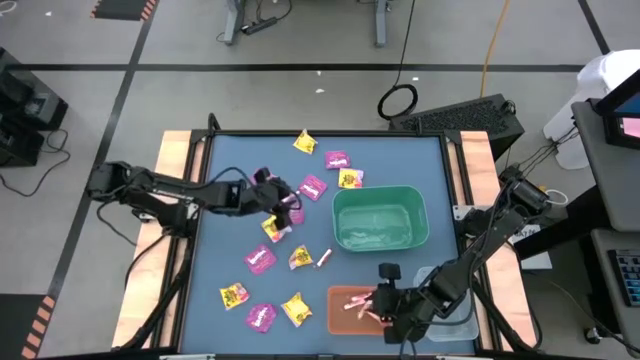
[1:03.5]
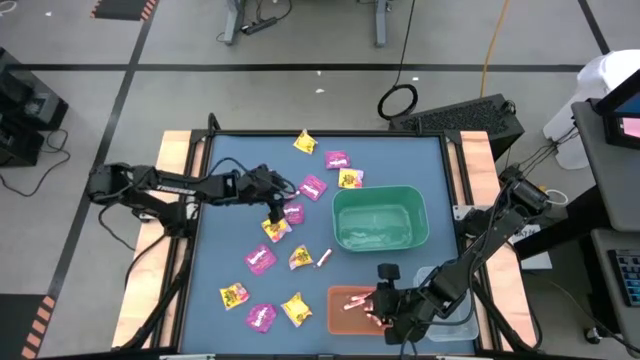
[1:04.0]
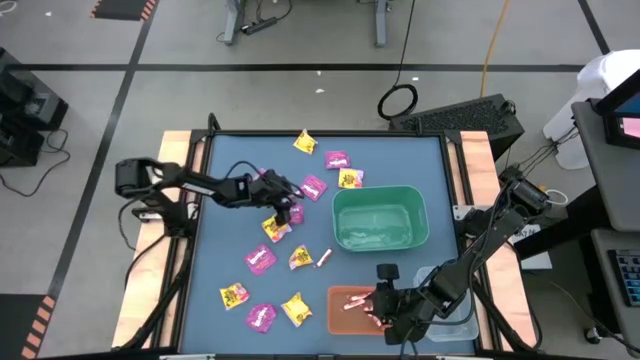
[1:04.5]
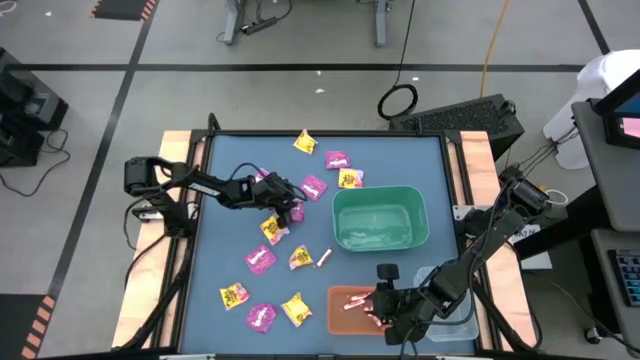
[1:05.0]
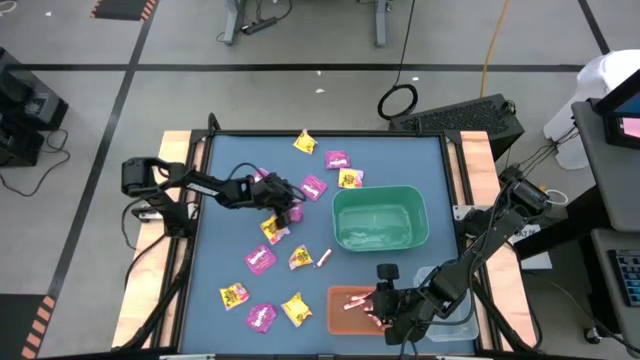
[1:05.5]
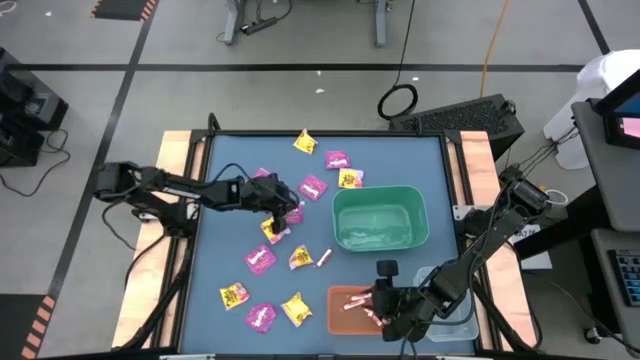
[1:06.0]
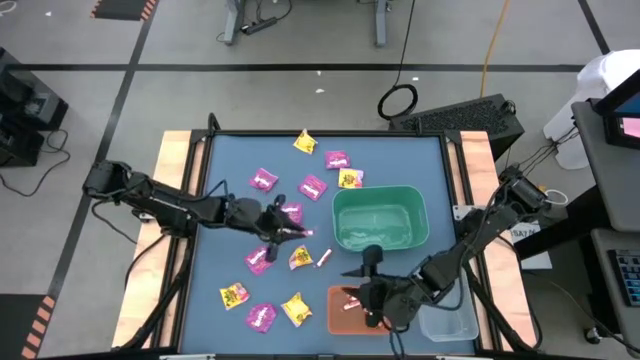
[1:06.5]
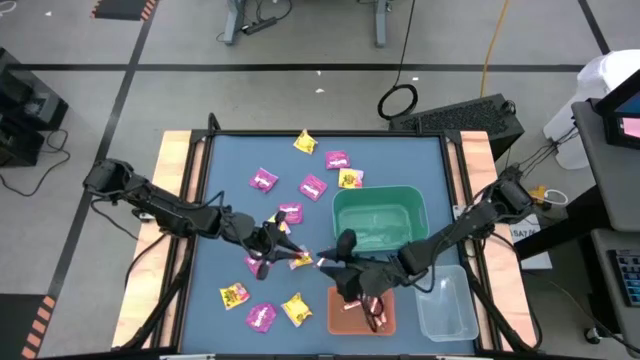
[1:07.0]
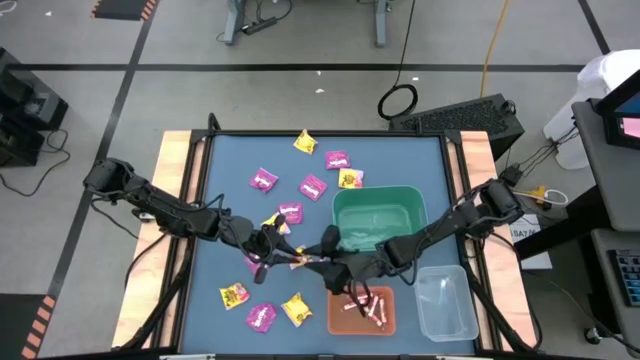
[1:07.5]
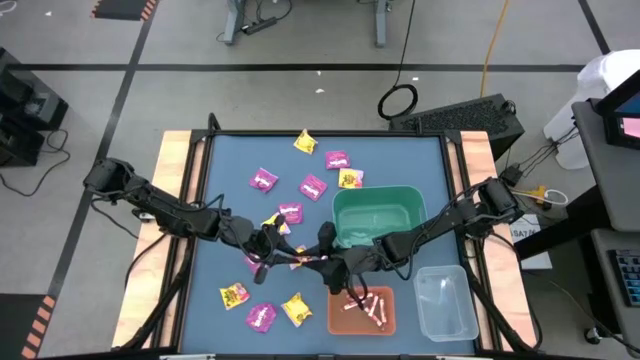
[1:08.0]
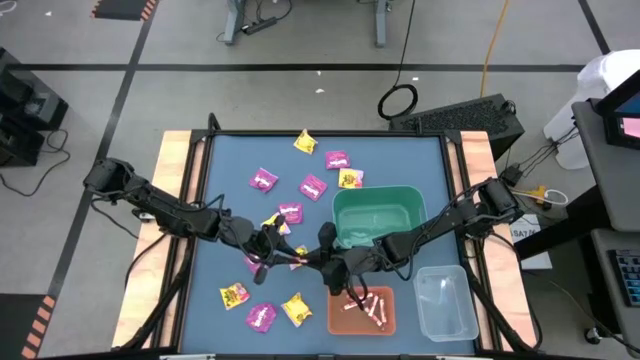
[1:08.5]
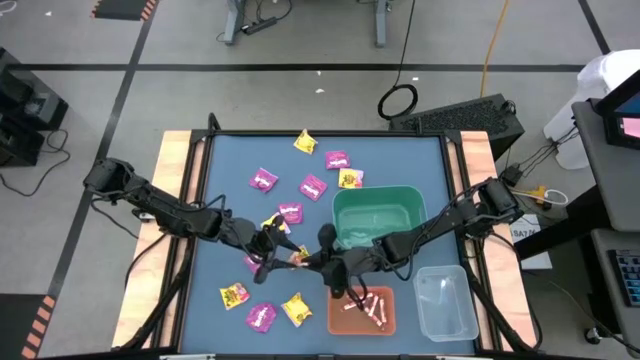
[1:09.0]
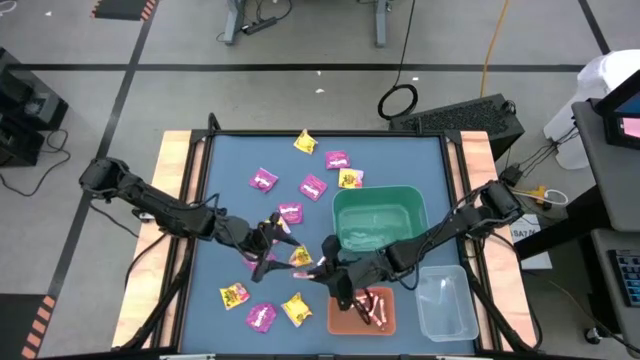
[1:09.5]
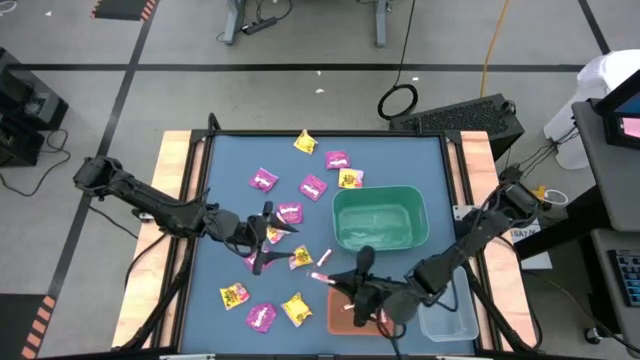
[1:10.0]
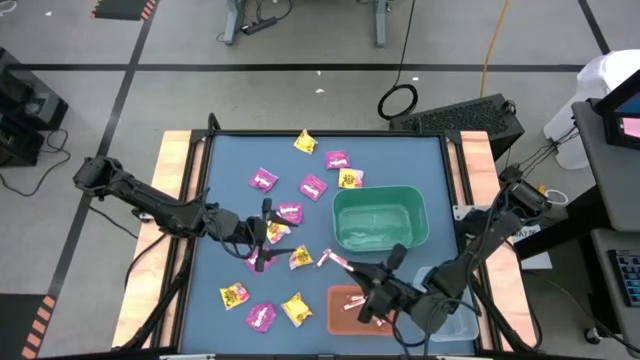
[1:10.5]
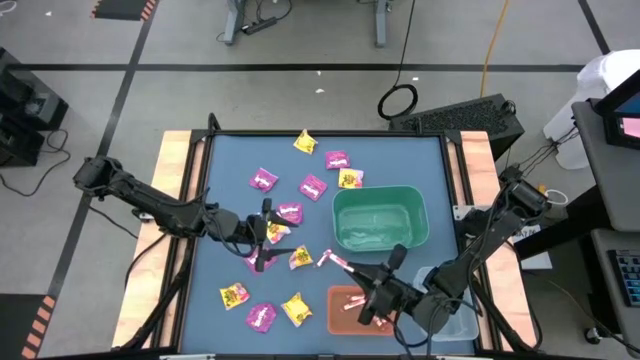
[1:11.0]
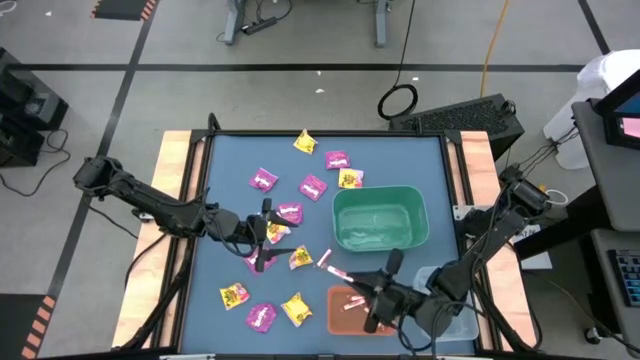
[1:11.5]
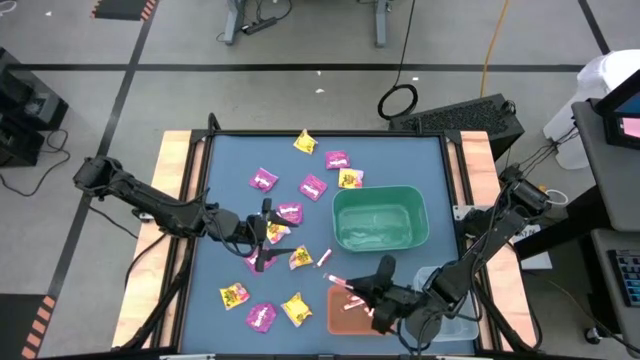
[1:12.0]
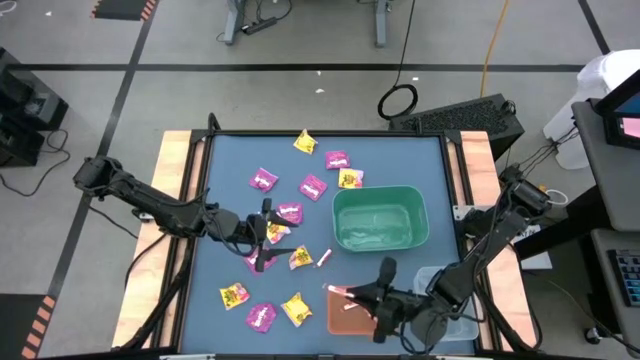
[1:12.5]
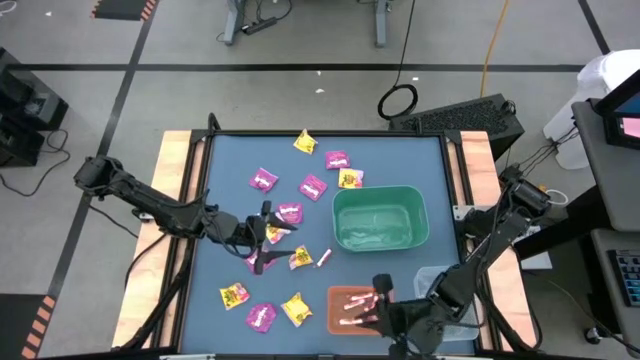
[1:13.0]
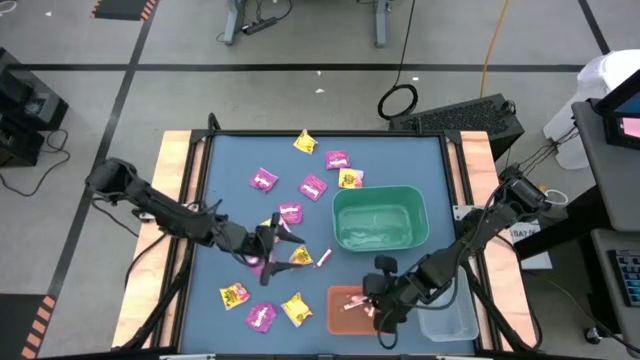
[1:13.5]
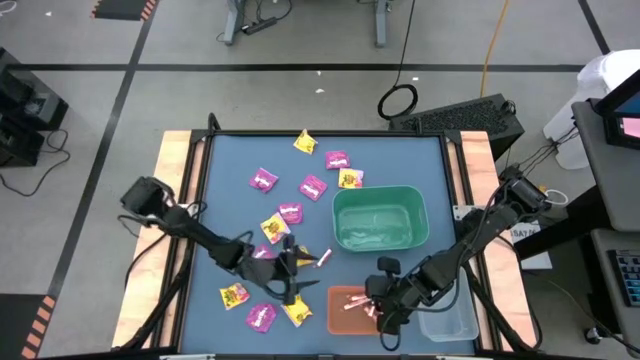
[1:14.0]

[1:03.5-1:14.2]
Task: Sort candy
Put the white candy into the orange bin

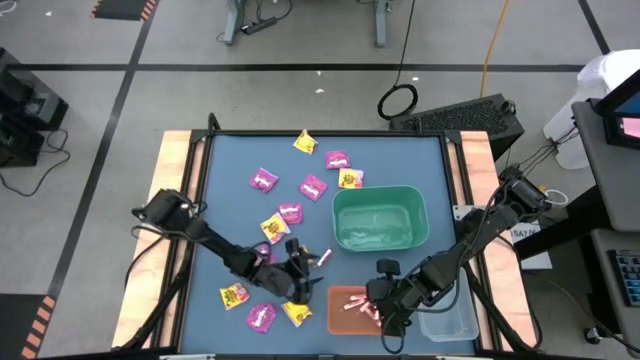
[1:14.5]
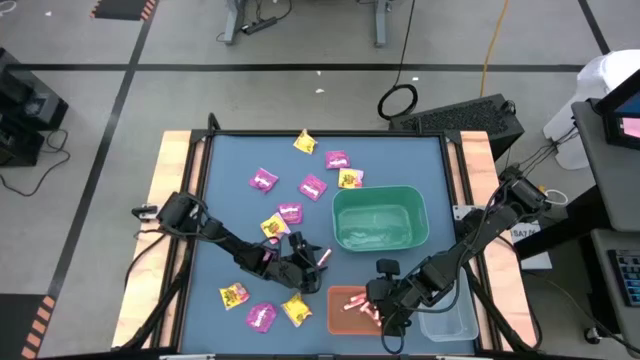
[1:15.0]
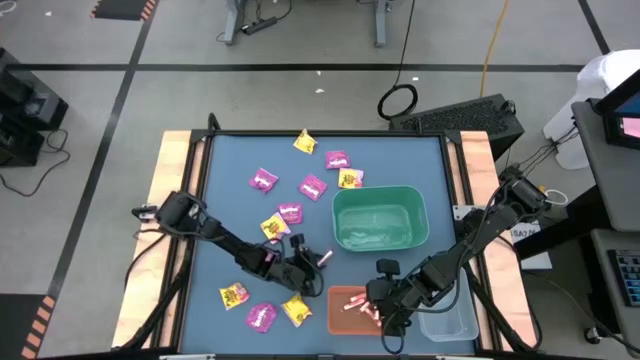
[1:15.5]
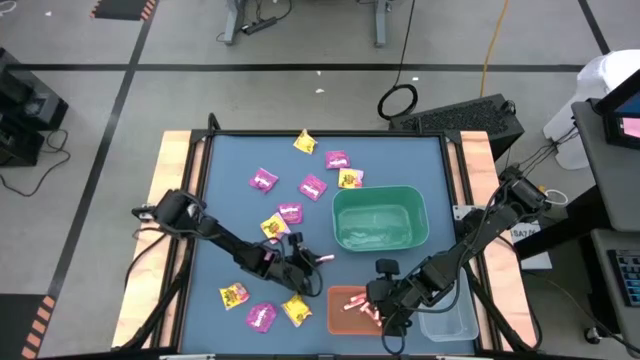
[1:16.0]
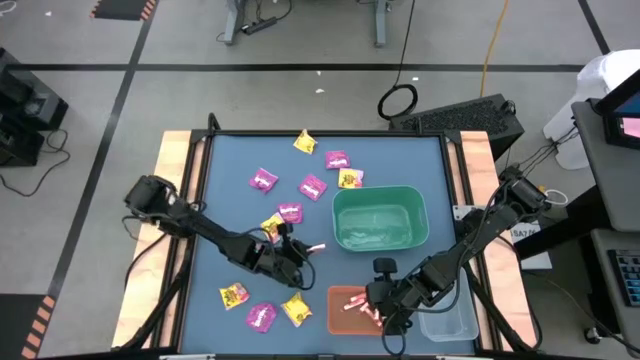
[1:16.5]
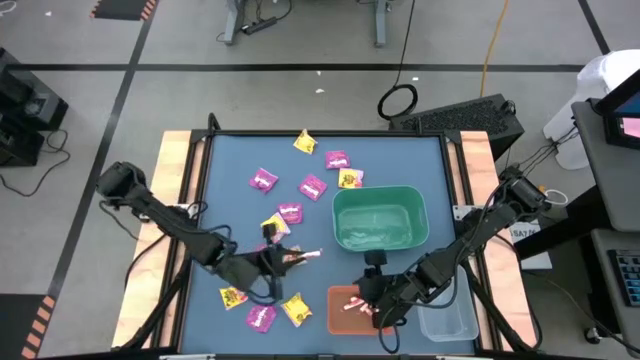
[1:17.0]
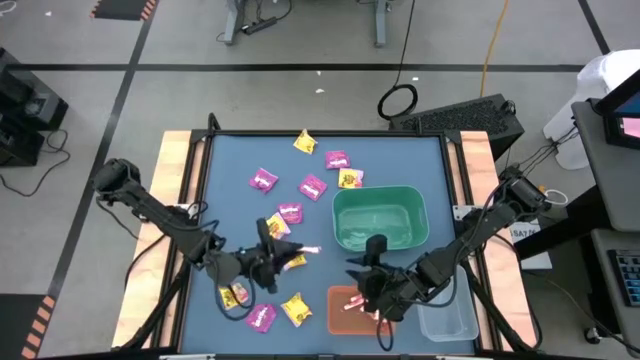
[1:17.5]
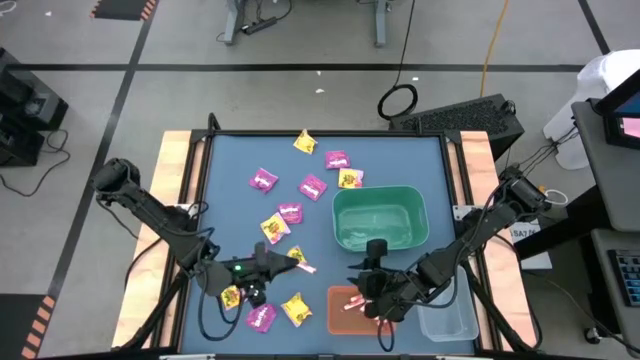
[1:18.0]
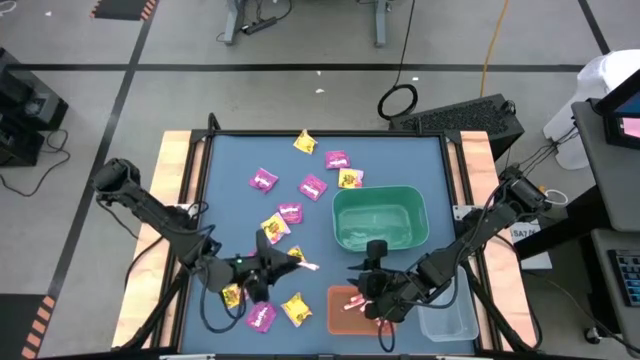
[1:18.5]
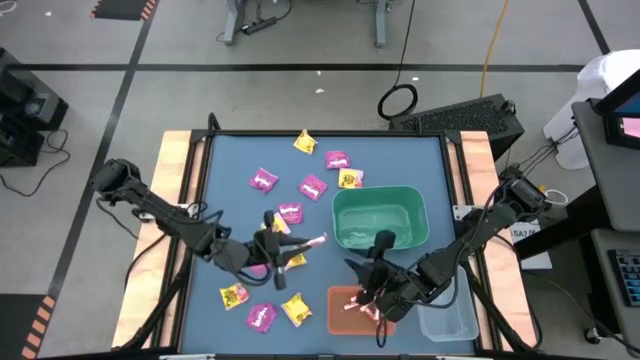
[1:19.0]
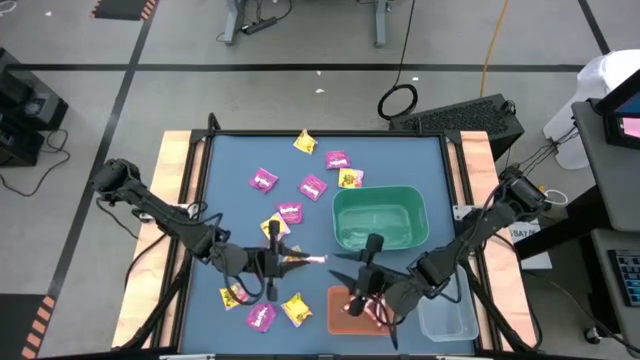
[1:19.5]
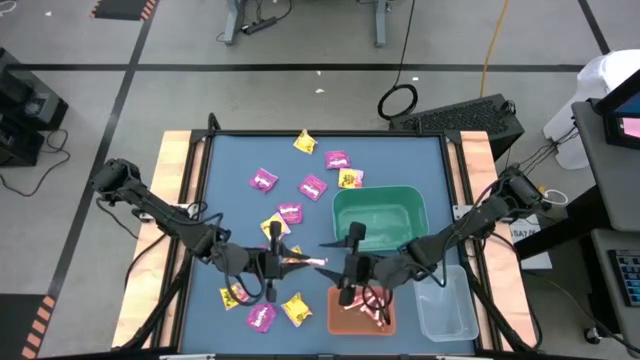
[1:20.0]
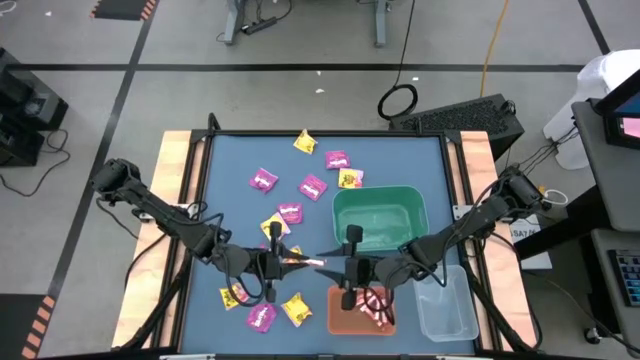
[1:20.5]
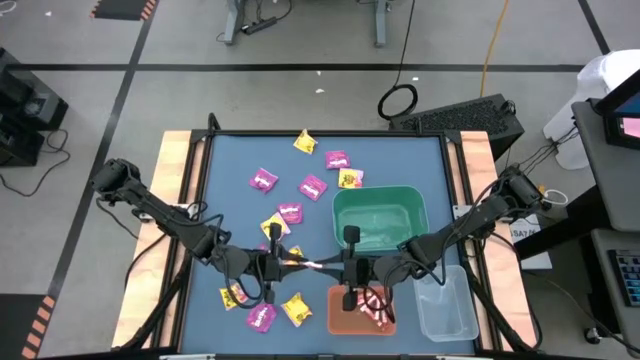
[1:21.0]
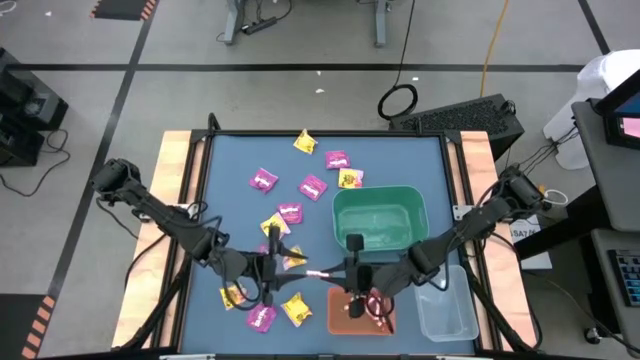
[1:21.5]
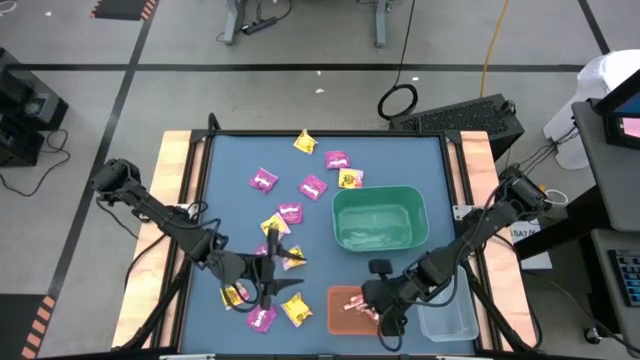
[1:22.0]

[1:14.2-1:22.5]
Put the white candy into the orange bin

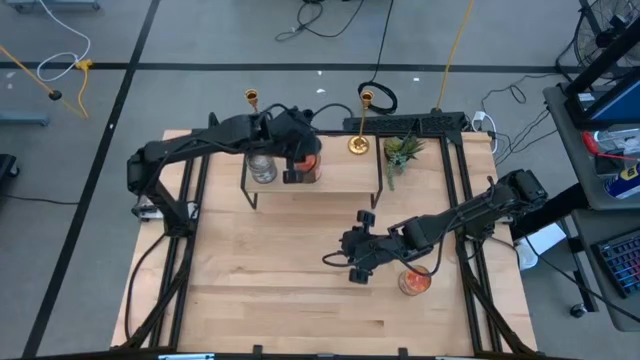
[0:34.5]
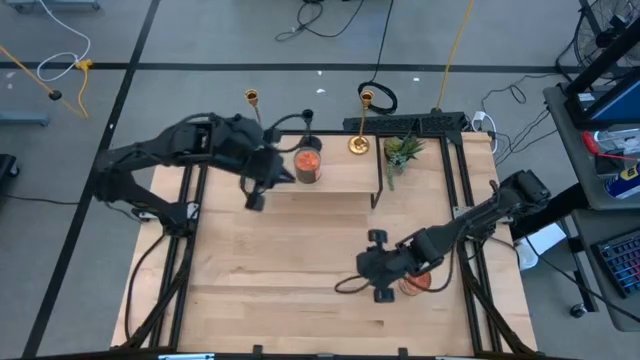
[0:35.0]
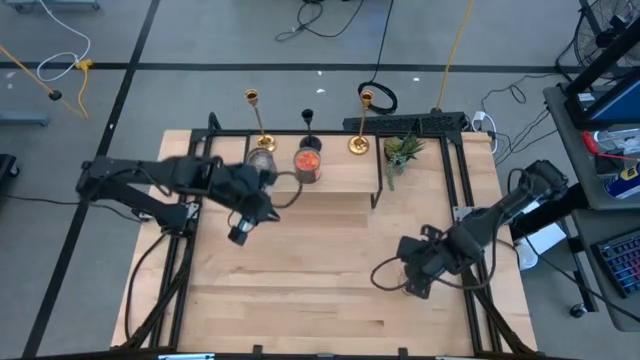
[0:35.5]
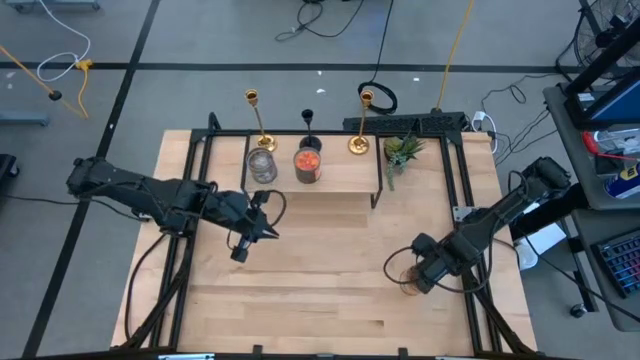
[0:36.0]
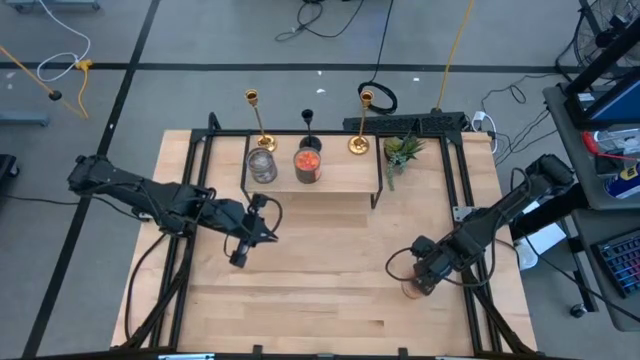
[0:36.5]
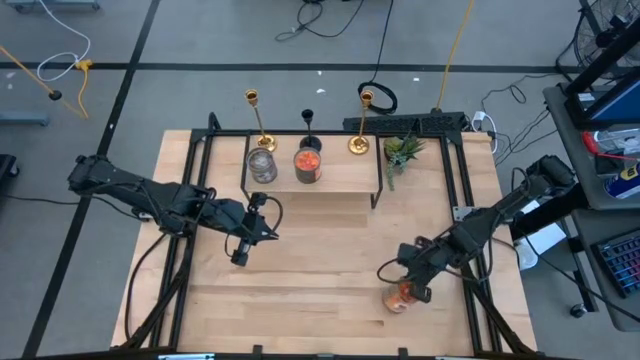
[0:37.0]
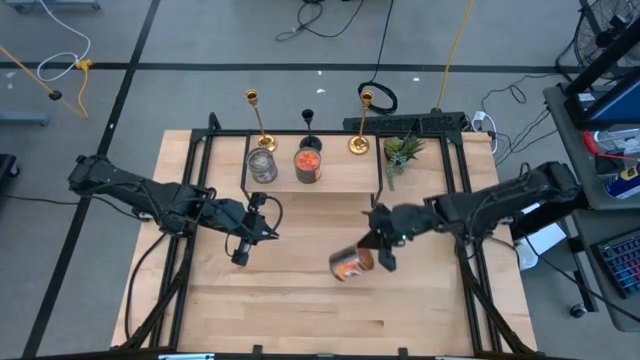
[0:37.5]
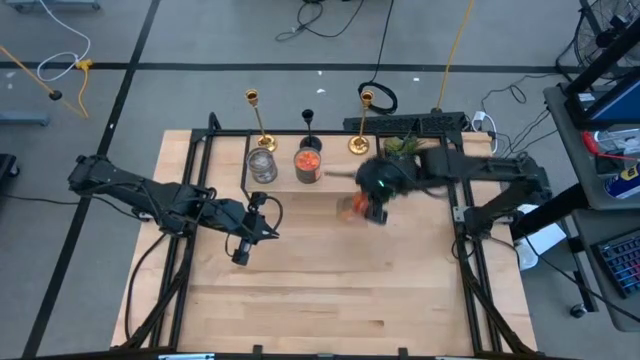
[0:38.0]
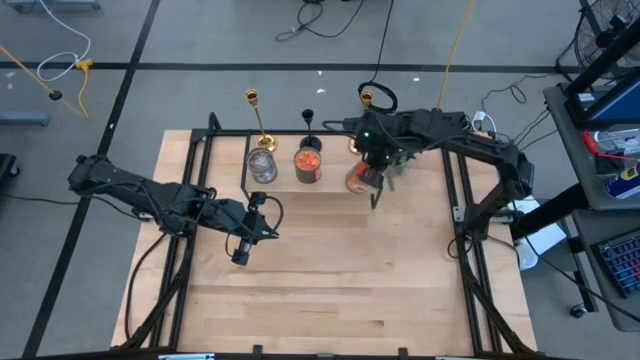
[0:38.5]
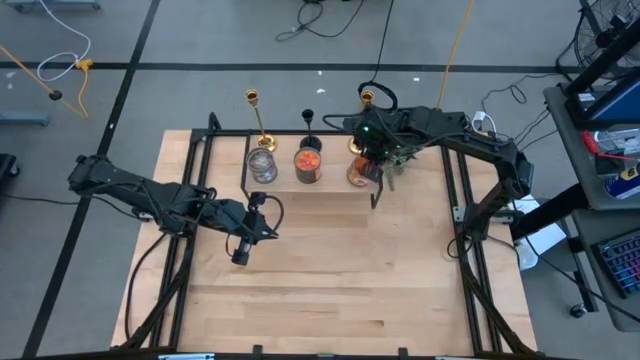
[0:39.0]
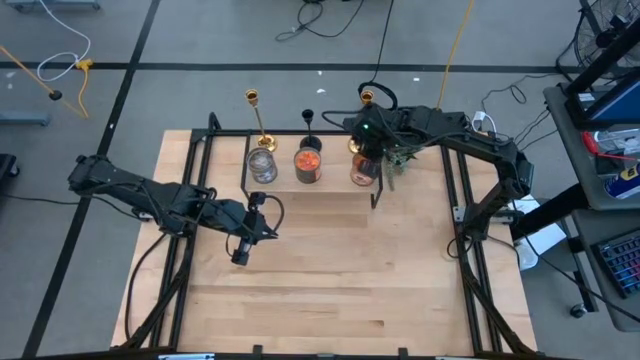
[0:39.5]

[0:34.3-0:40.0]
Task: Pick & Place candle stick holders
Put the orange scented candle on the shelf
